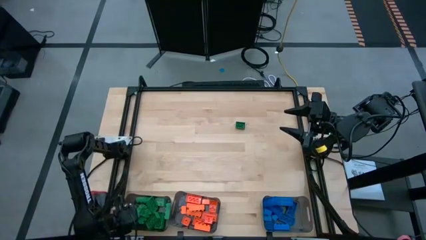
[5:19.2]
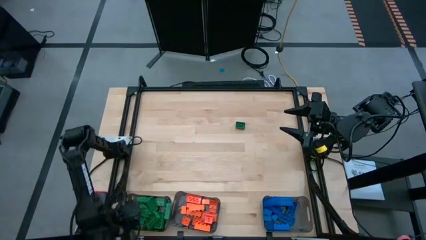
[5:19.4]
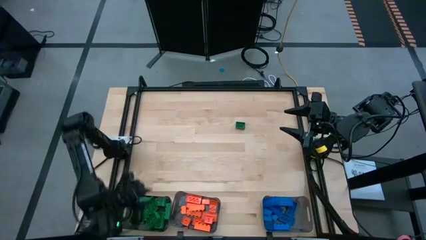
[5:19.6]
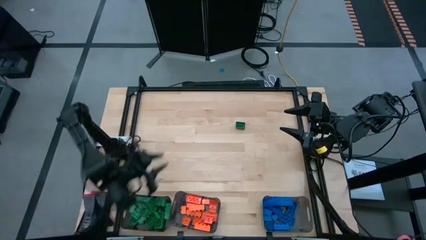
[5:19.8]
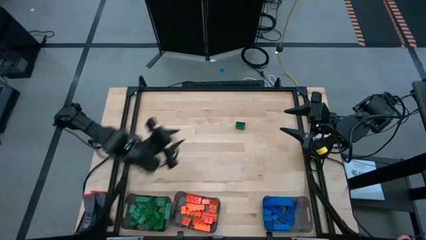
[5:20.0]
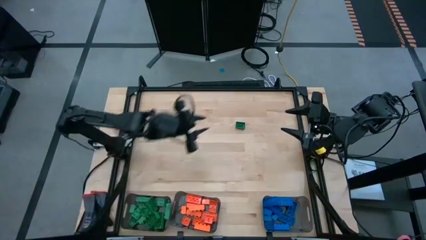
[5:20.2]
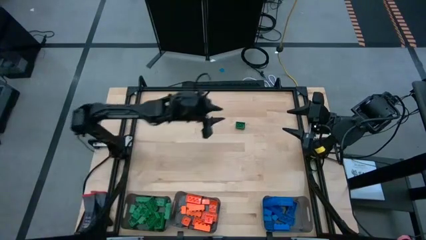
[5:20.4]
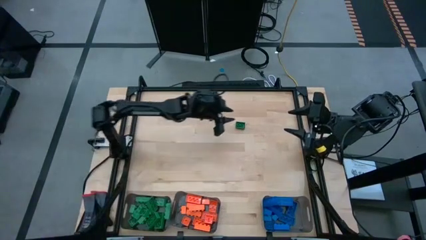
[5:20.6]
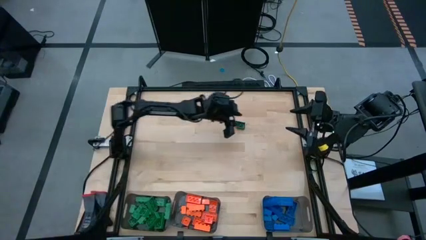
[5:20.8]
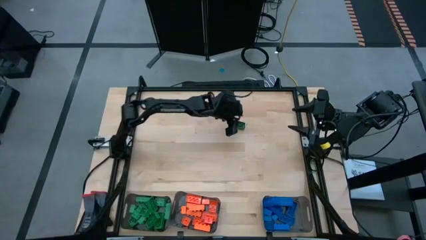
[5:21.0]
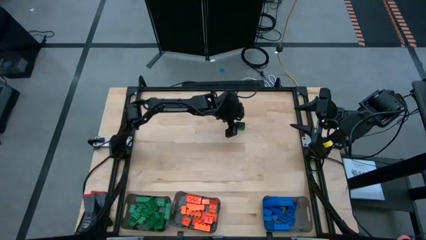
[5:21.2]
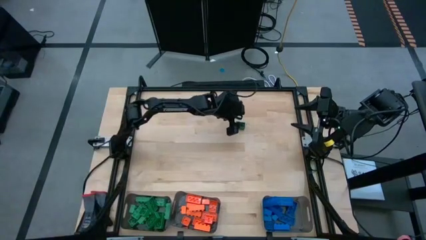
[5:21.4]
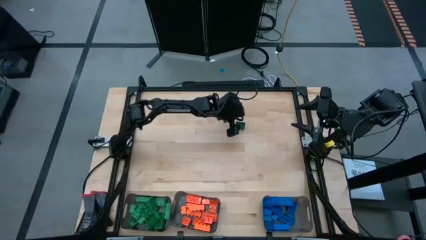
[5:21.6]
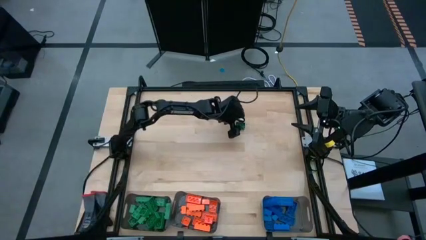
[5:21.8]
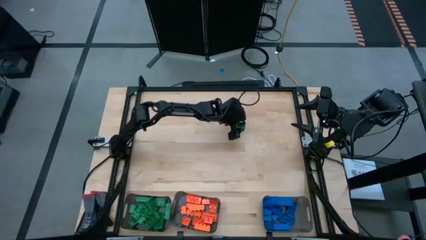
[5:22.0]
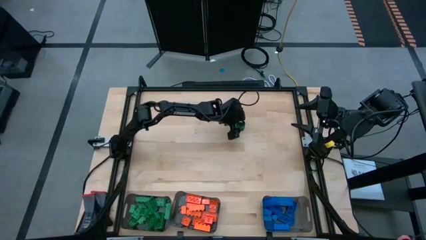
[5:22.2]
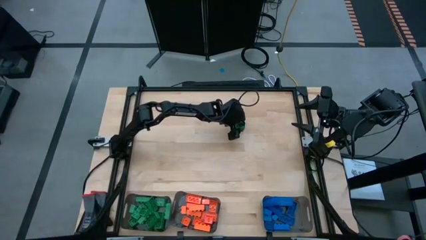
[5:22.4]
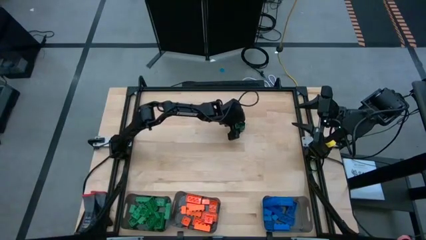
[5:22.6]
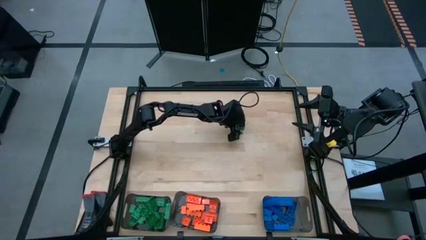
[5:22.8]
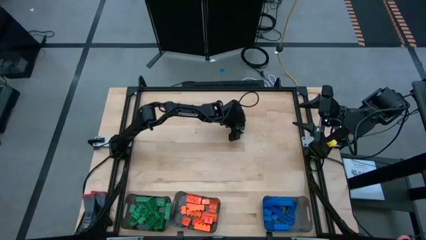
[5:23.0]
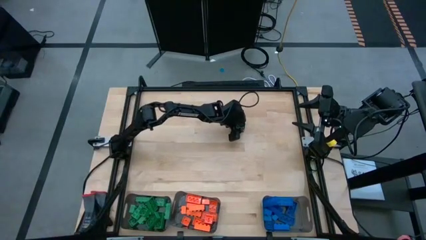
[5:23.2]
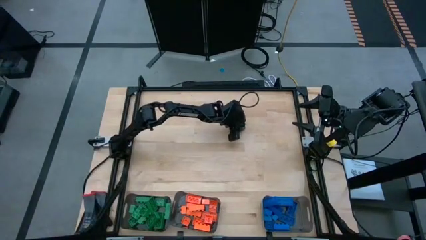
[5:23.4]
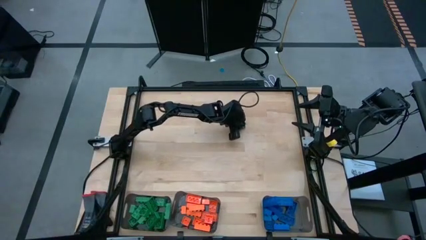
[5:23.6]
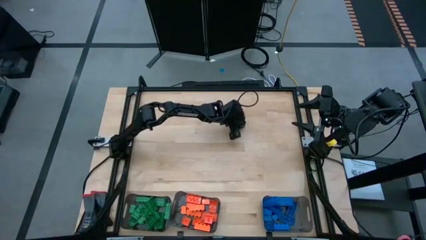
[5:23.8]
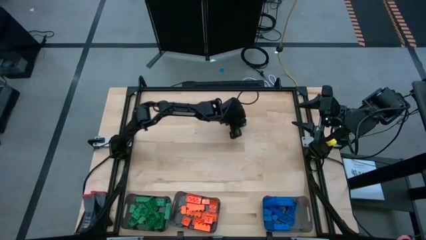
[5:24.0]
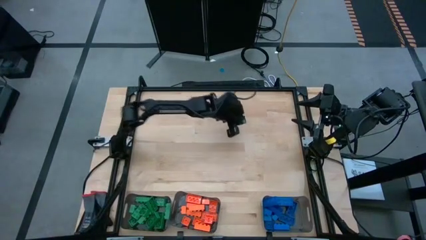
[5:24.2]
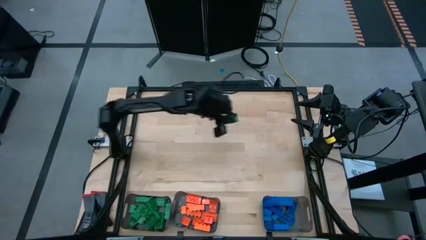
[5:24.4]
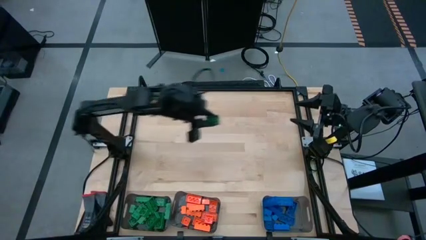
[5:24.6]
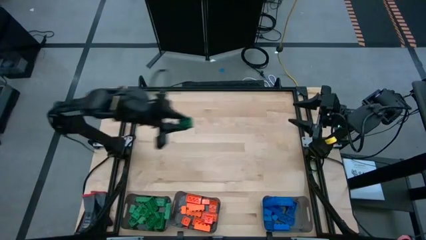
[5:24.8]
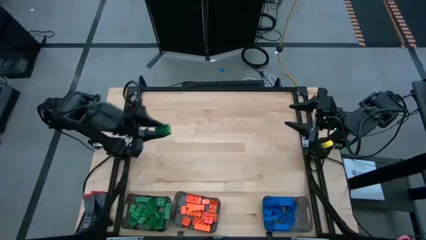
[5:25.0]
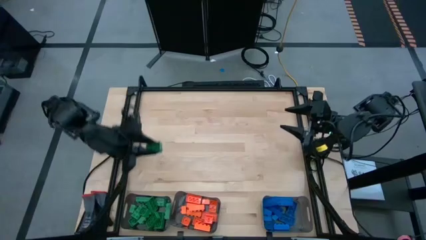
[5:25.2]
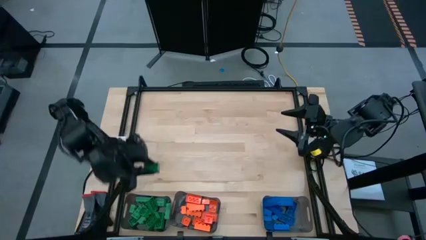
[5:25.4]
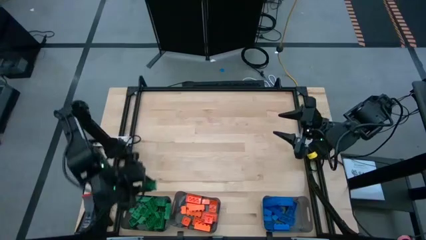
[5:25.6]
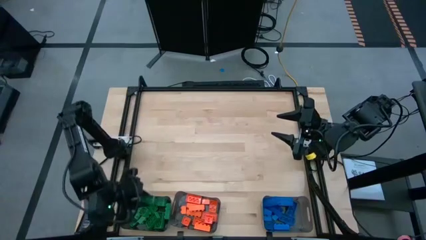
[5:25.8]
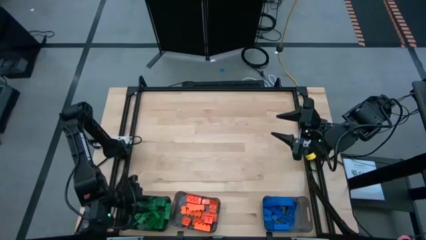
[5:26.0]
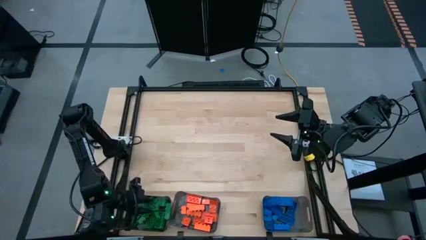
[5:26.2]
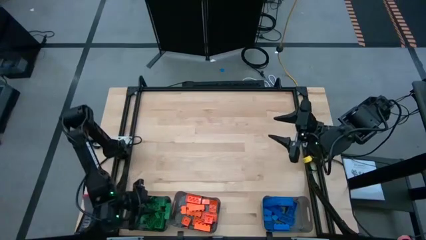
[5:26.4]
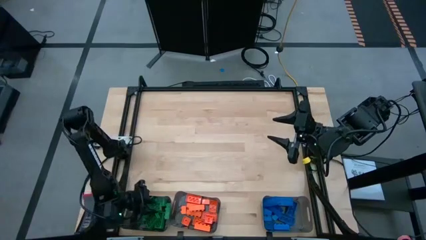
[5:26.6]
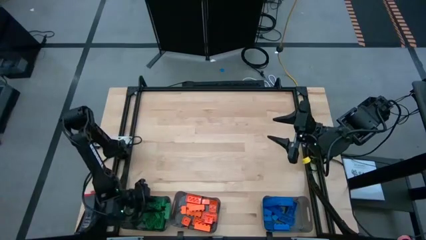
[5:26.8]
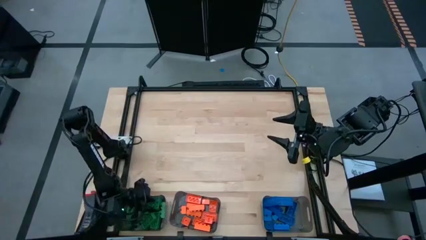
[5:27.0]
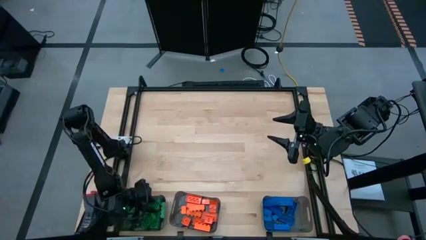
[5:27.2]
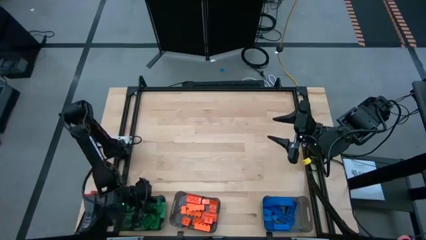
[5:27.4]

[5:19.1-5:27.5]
Task: Sort blocks
Put the green game piece into the left black bin

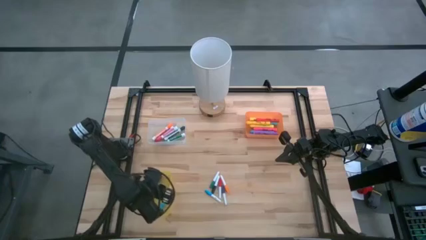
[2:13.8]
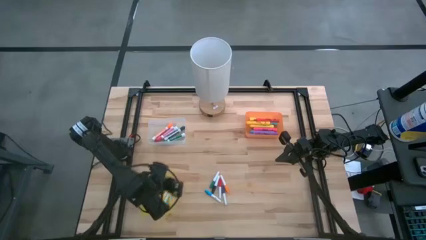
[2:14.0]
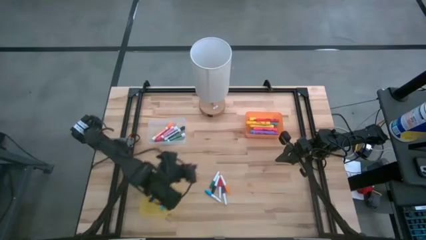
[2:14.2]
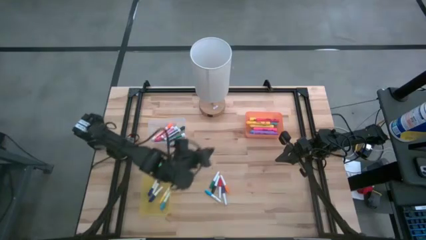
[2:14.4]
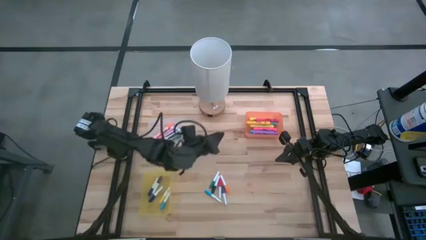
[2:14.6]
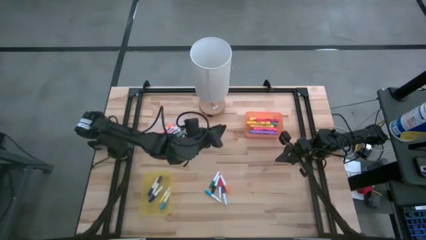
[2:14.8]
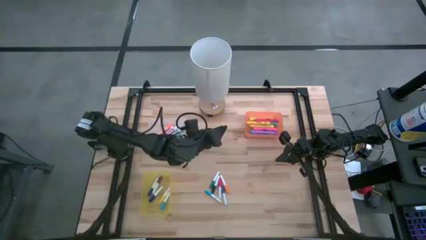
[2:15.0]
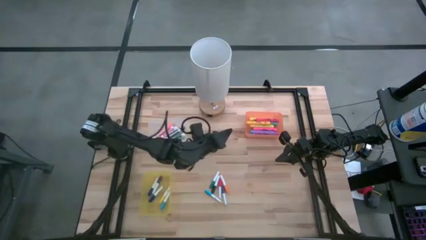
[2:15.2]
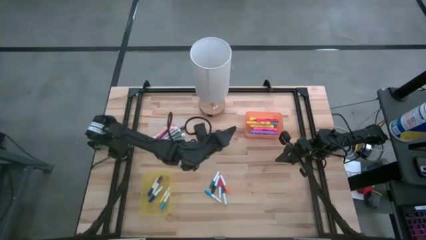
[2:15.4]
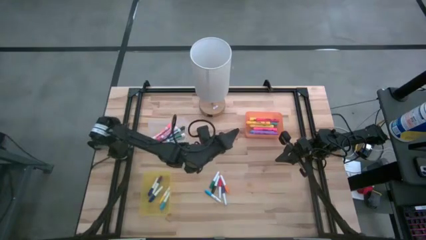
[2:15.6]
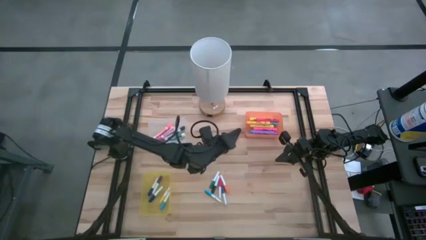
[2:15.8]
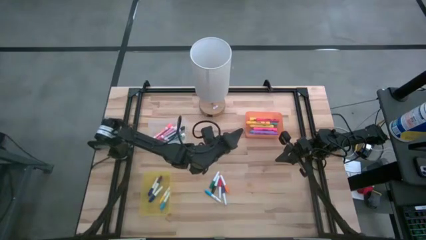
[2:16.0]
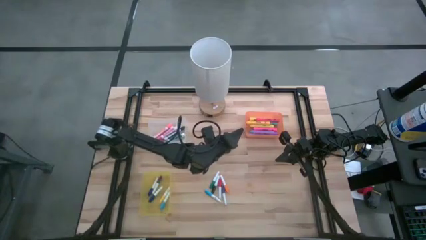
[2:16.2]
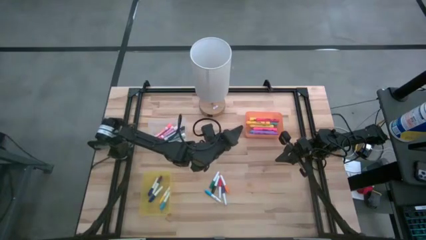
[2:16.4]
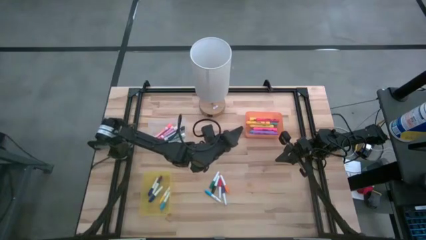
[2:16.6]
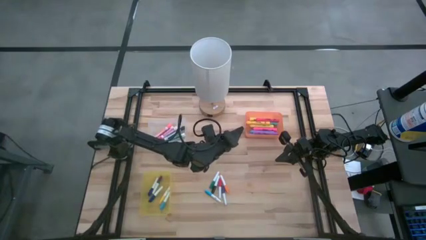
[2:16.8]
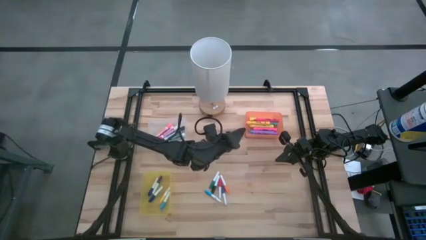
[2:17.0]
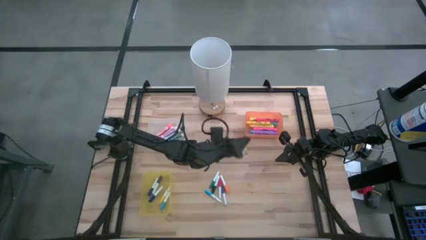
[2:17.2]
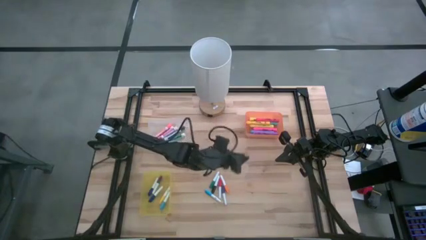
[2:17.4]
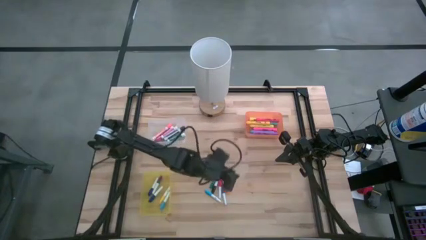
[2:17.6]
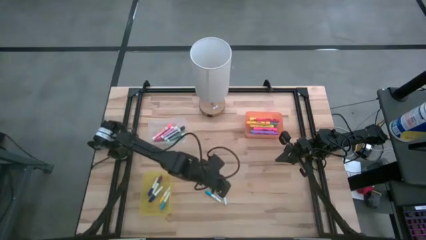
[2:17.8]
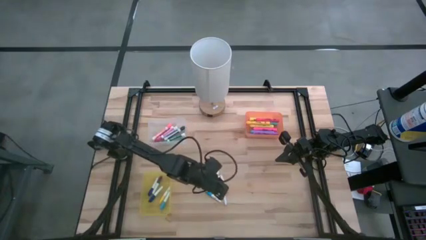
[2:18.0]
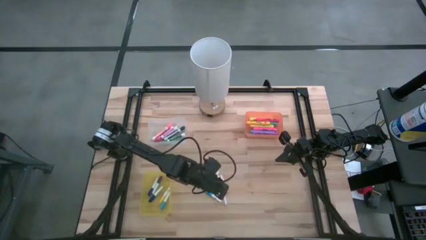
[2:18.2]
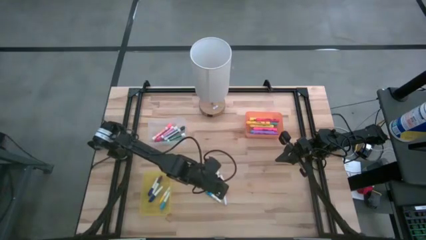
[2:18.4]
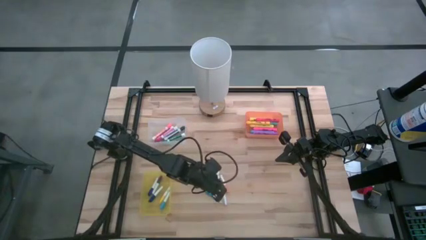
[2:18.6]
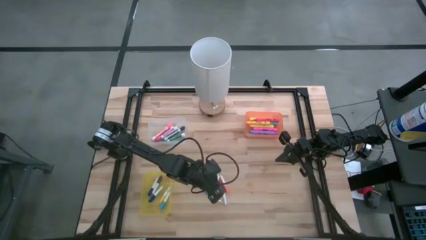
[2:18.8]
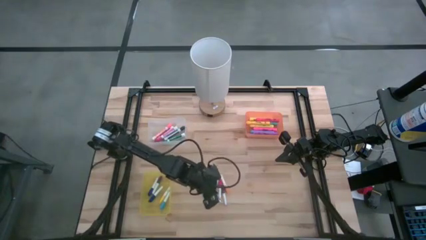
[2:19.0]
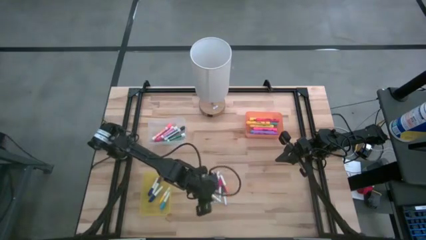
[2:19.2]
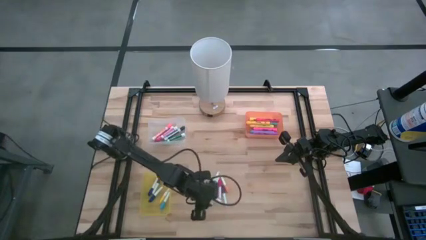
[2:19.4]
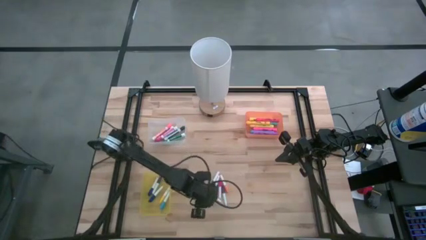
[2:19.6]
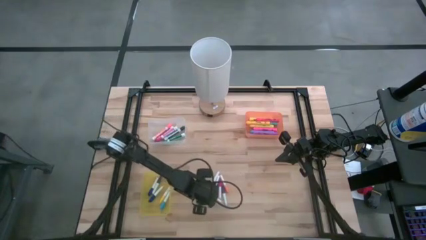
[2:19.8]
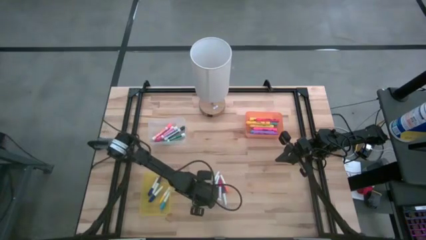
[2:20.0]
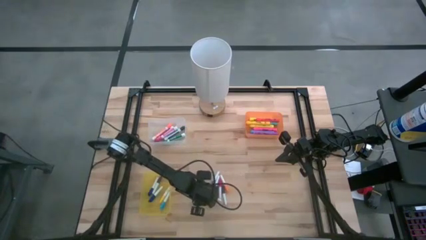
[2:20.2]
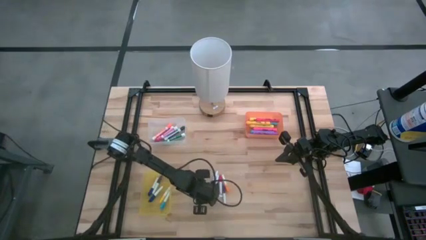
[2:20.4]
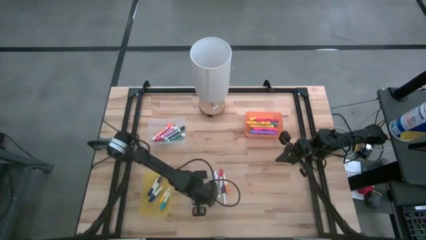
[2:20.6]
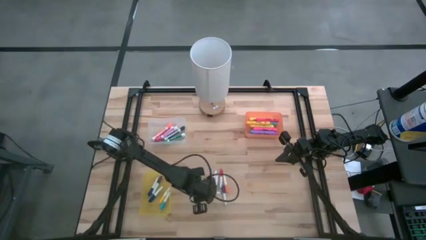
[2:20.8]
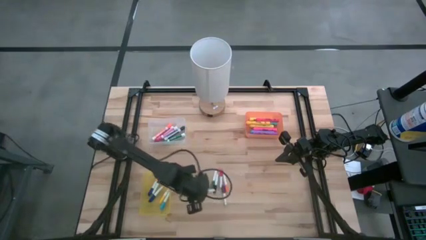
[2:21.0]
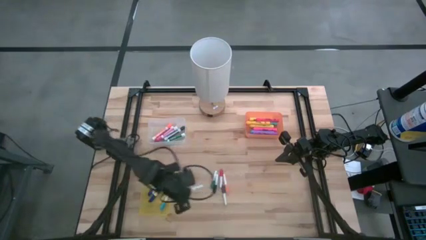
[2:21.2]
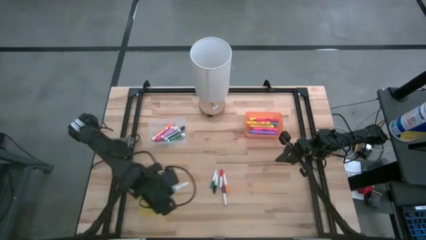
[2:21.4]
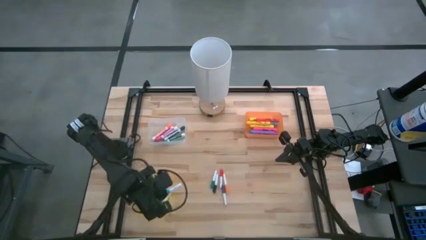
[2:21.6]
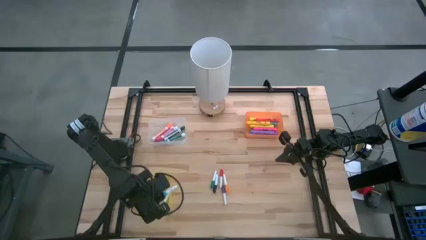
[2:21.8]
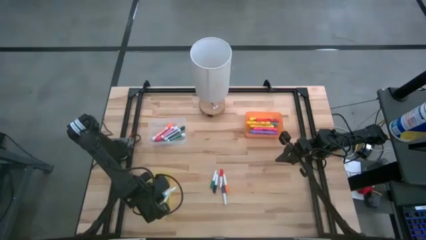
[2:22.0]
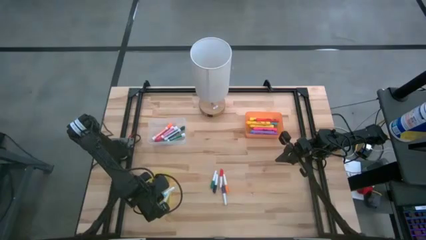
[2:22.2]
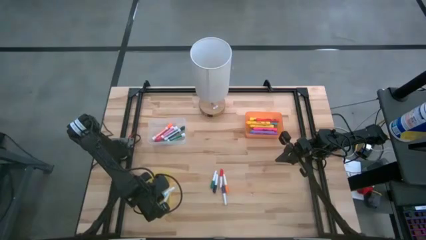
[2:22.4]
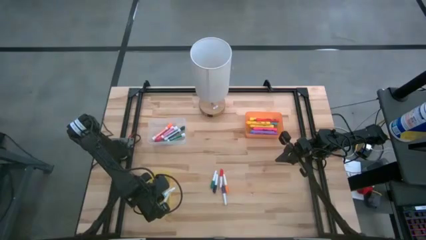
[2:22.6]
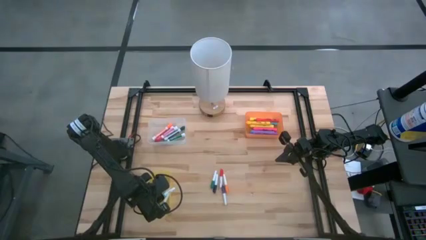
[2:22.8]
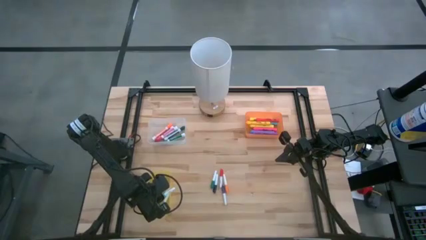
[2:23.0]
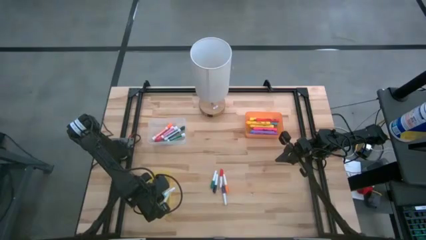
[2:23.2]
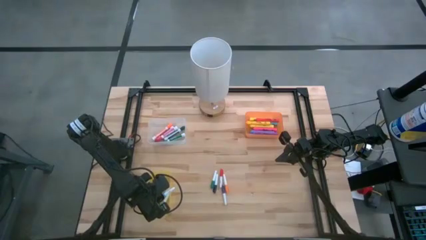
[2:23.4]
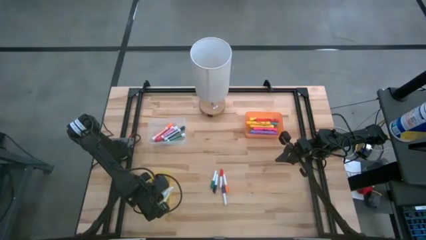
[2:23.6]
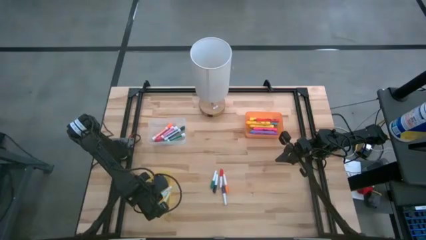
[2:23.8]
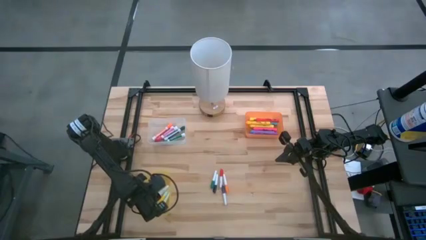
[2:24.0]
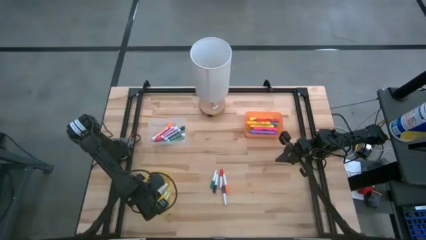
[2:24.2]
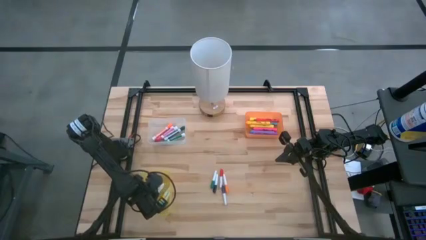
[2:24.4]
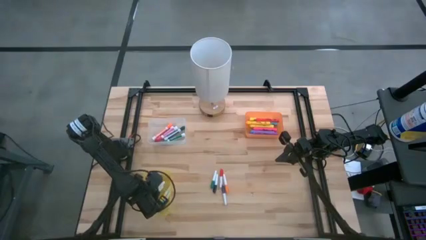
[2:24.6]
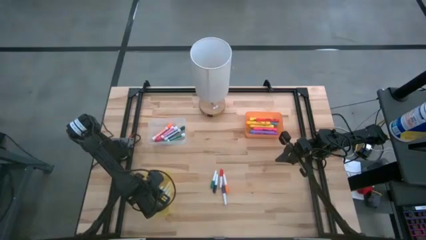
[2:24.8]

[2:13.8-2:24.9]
Task: Pick & Place Markers
Put the small light blue highlighter pen into the yellow bin
